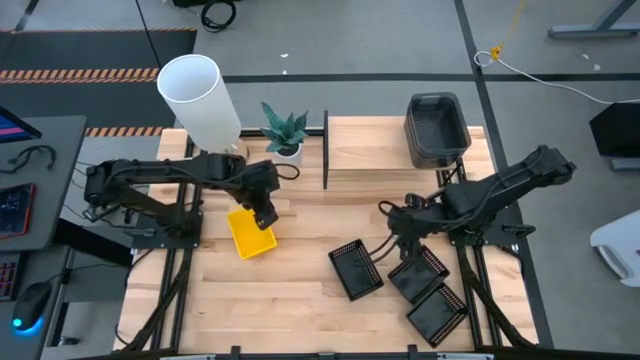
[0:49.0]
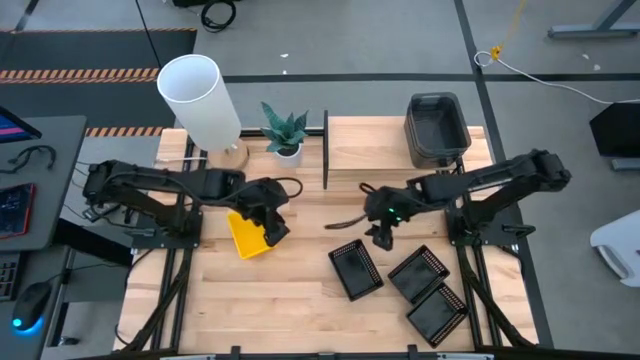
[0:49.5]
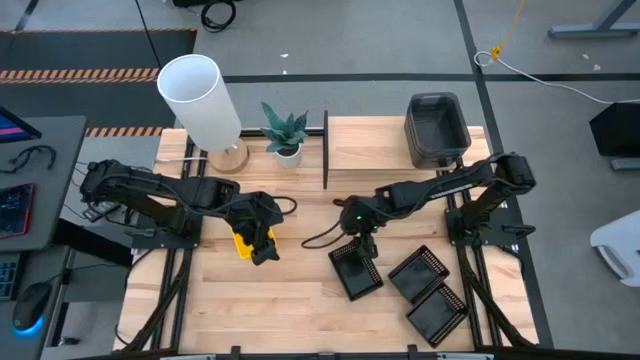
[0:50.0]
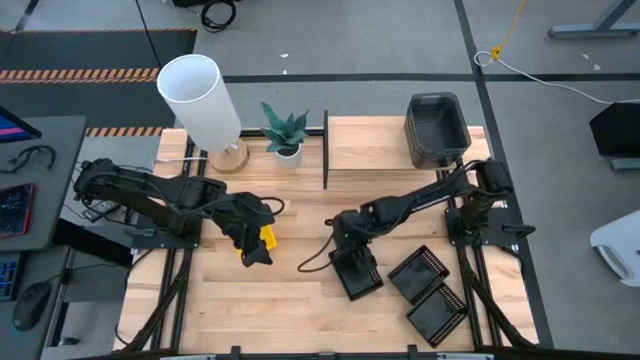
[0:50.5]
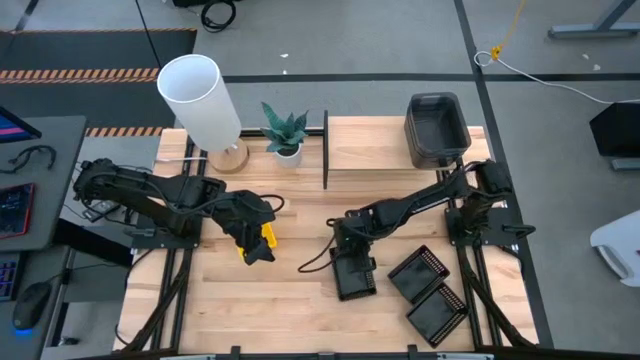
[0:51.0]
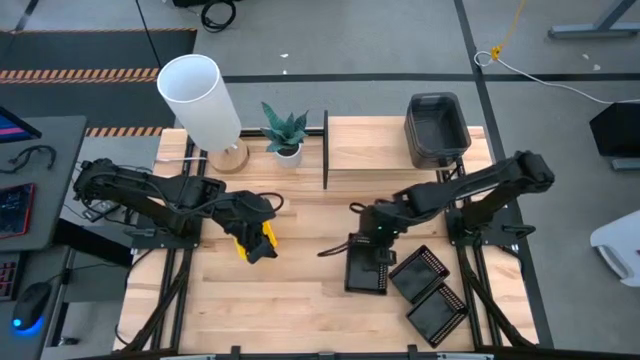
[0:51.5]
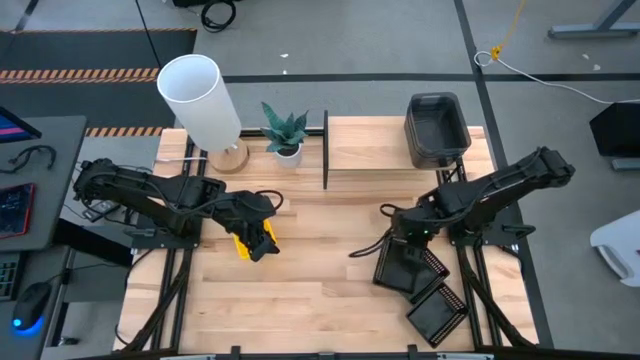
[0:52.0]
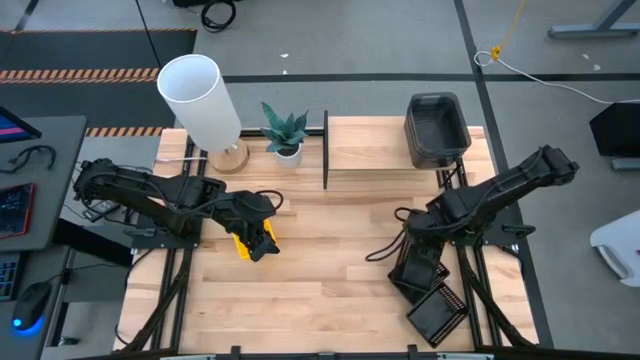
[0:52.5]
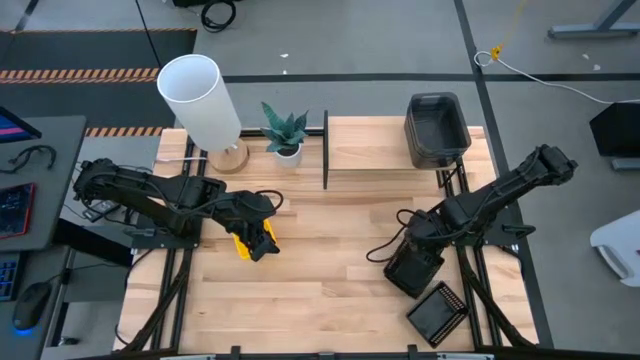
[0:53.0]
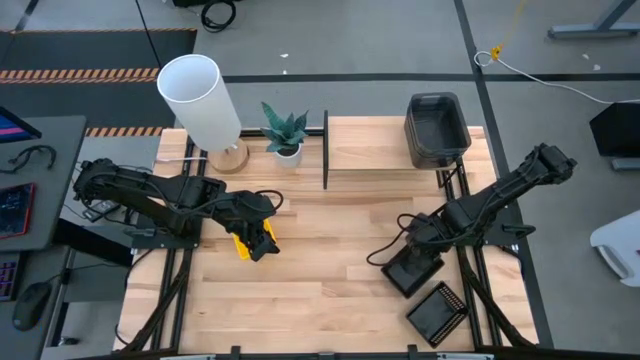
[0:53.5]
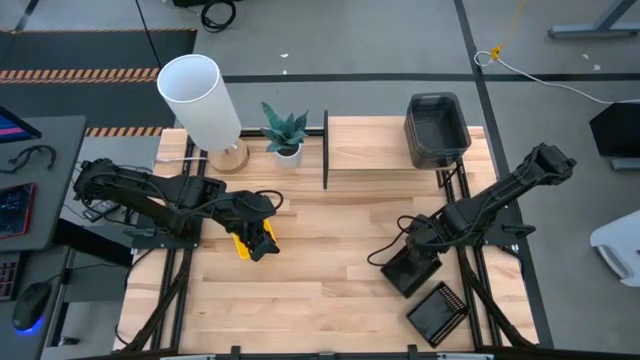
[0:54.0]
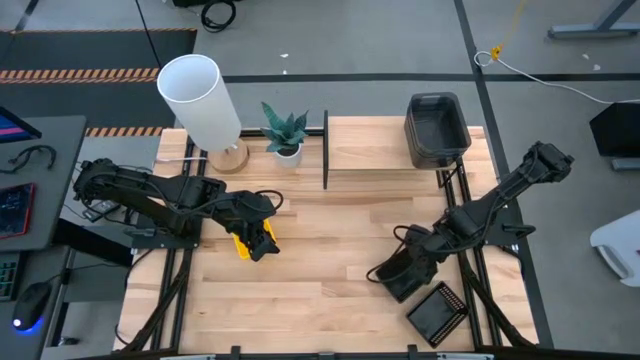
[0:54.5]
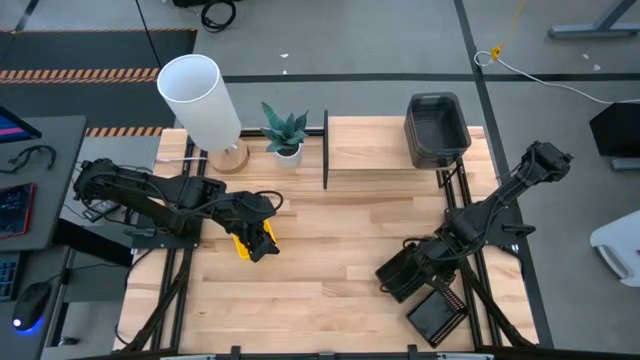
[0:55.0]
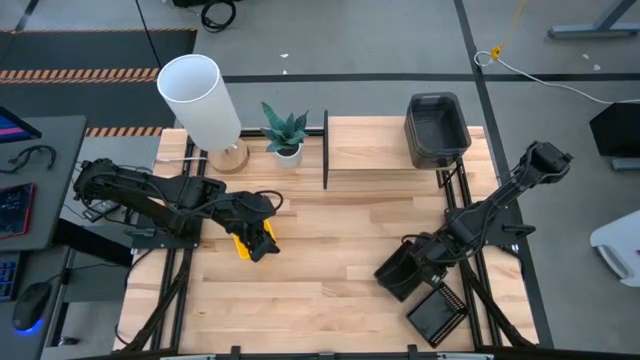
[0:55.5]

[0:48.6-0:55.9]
Task: Stack baskets on shelf by color
Stack the top left black bin on top of the top black bin

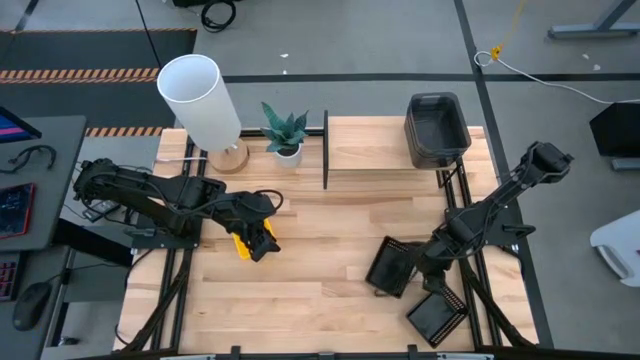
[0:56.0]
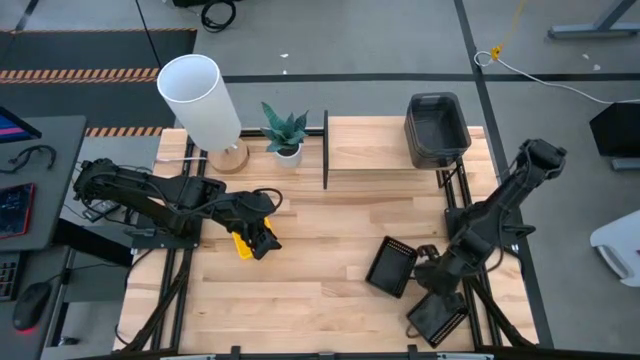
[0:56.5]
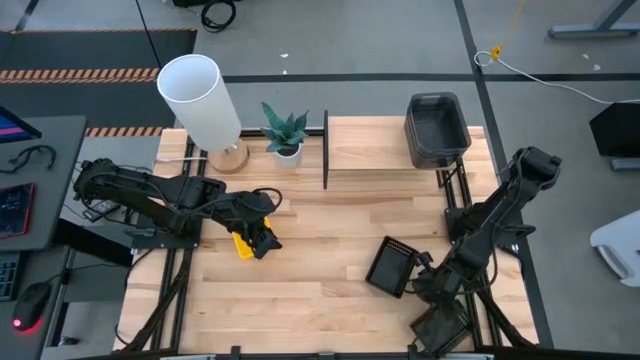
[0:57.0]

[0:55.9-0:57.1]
Stack the bottom black bin on top of the black bin

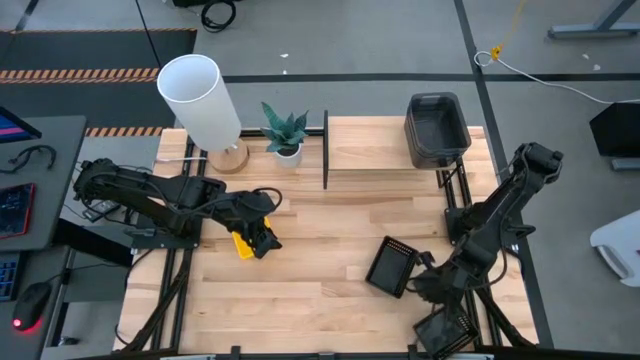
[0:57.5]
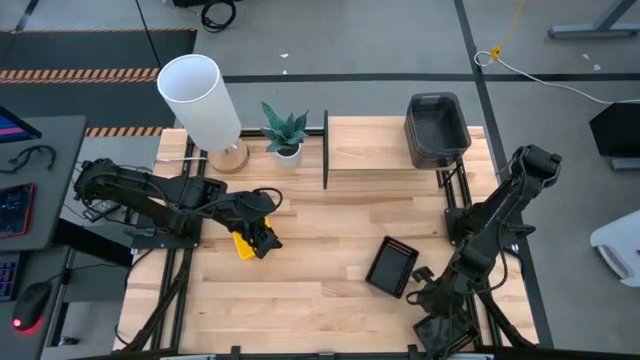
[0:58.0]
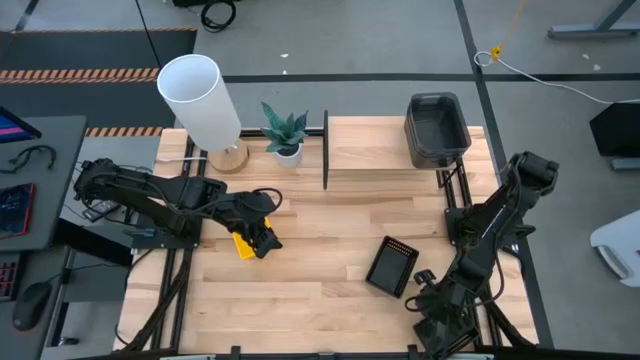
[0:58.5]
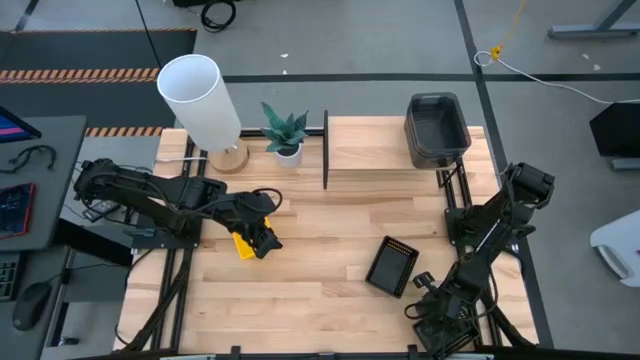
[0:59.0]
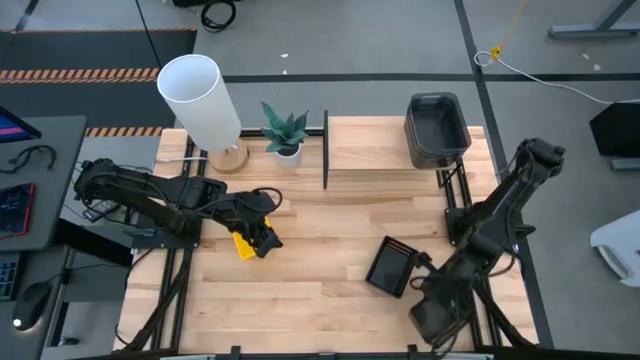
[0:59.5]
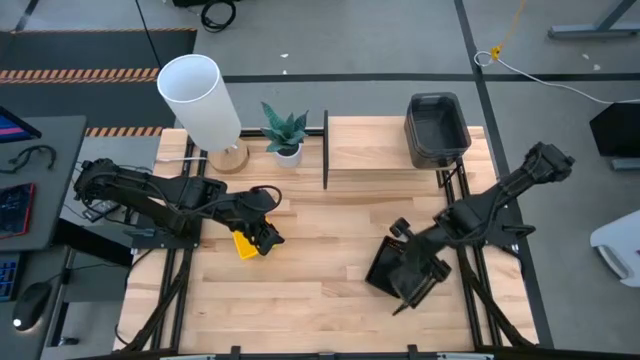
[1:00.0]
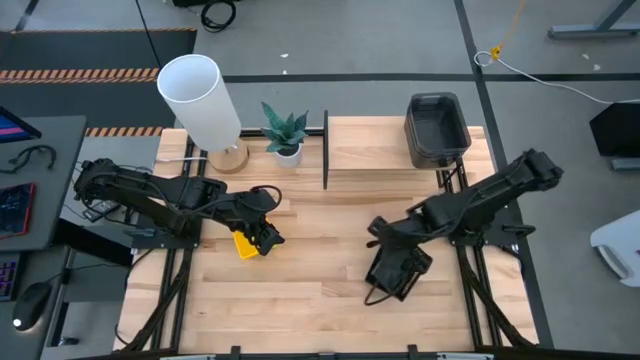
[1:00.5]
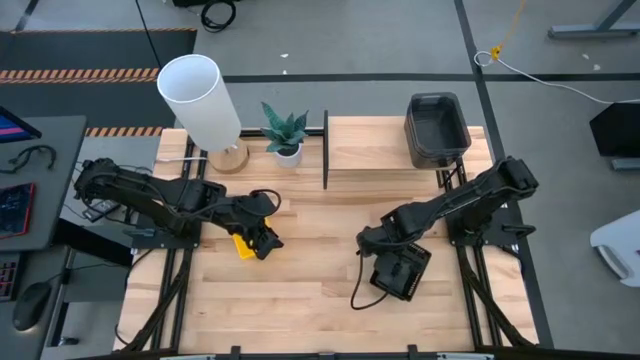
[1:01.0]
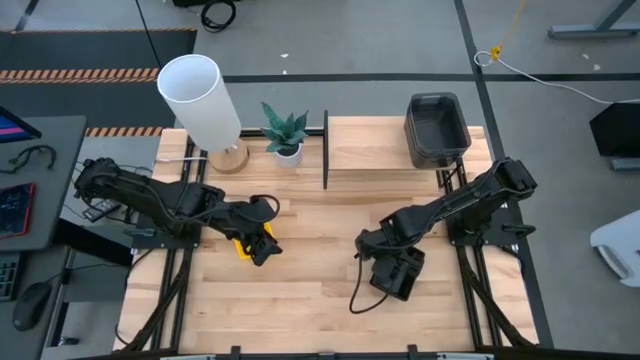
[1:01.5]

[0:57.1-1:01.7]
Stack the bottom black bin on top of the black bin

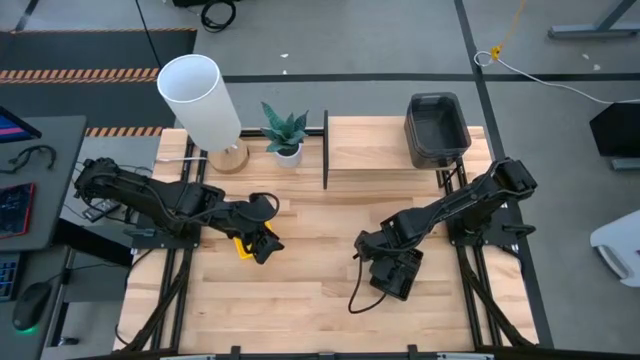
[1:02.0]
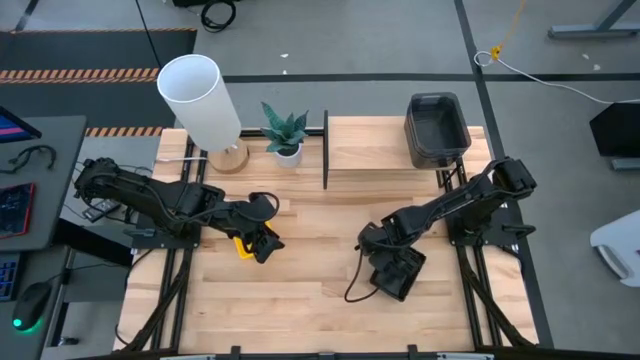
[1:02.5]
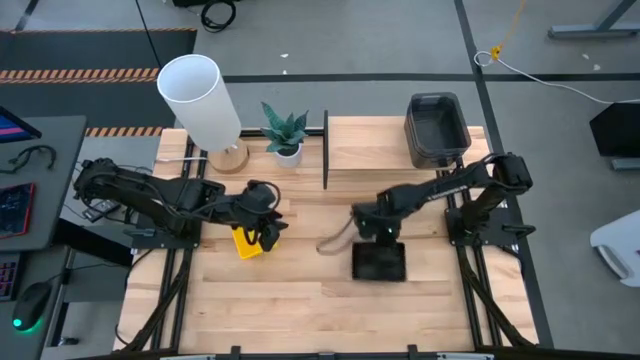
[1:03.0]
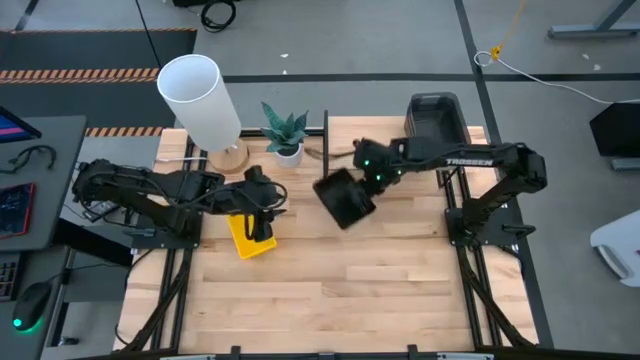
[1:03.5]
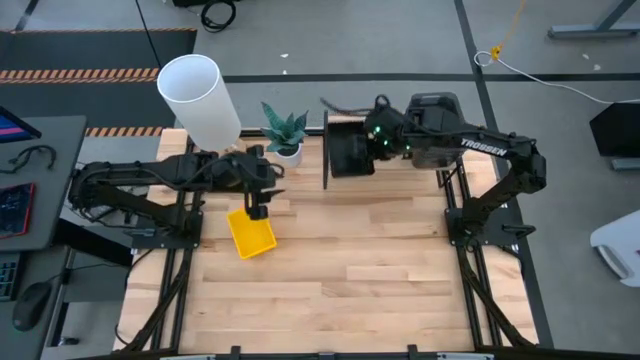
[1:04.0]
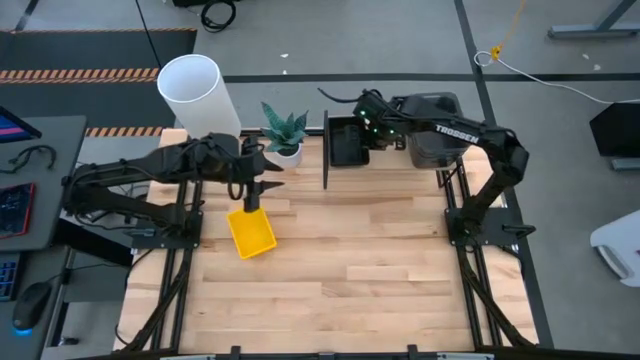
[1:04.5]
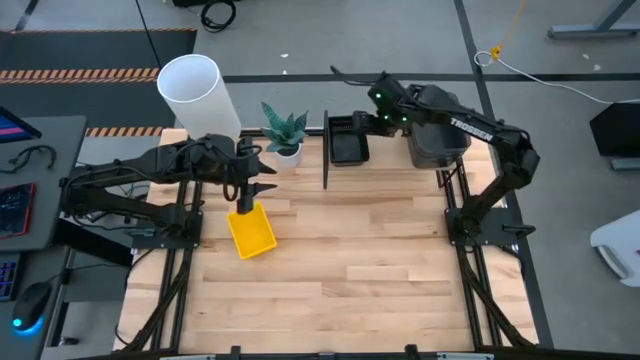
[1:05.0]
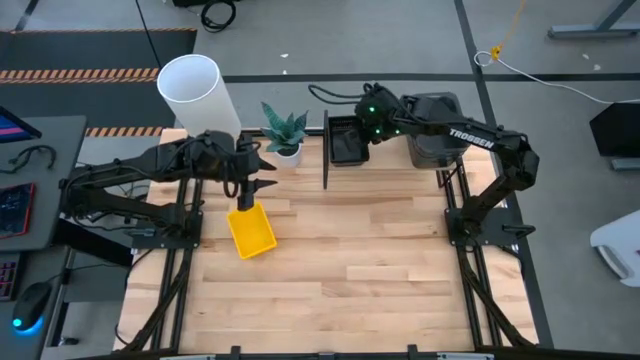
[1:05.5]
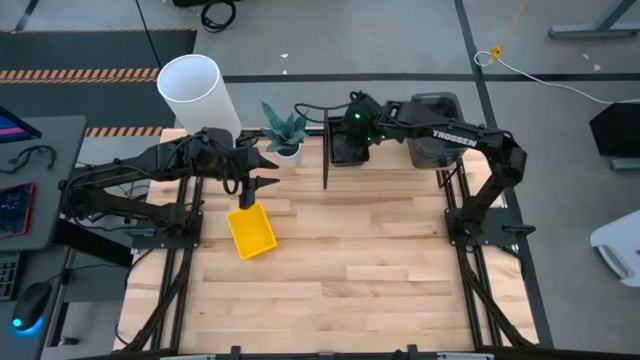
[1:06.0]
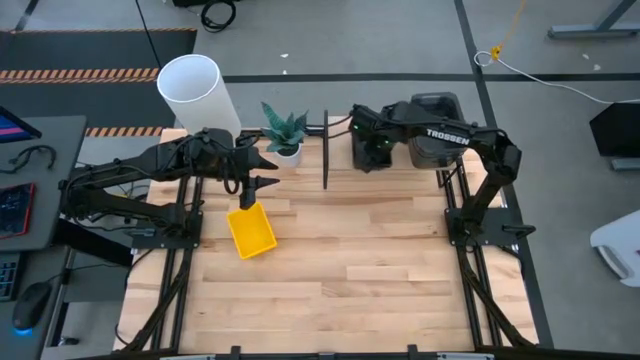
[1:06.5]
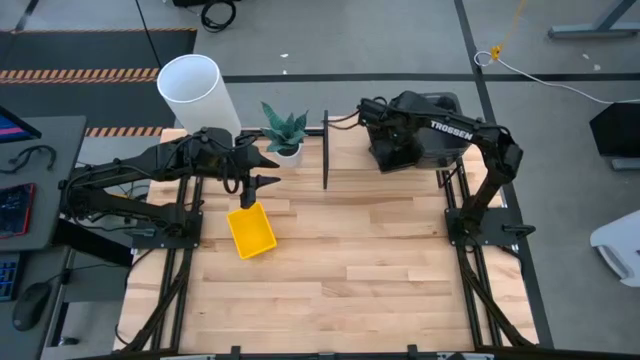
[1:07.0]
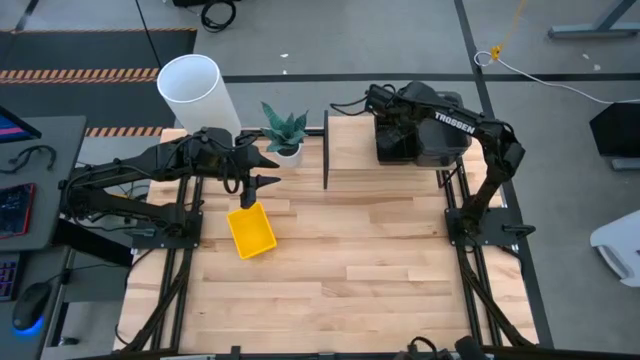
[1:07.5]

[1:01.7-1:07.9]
Put the stacked black bins on the shelf

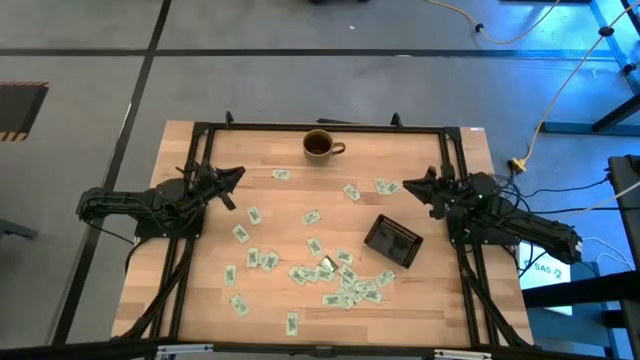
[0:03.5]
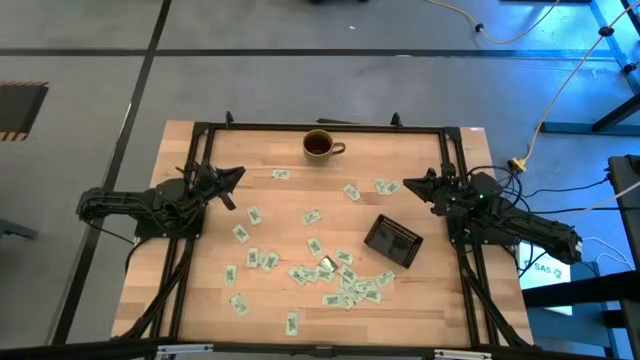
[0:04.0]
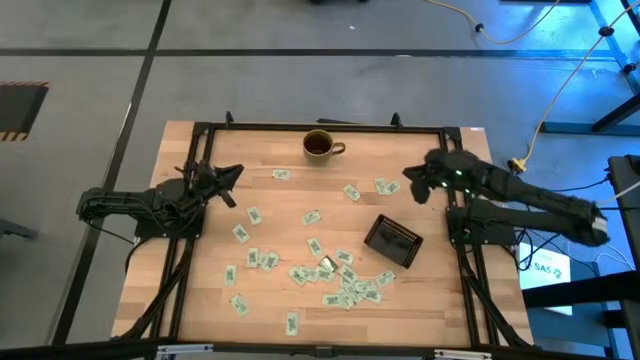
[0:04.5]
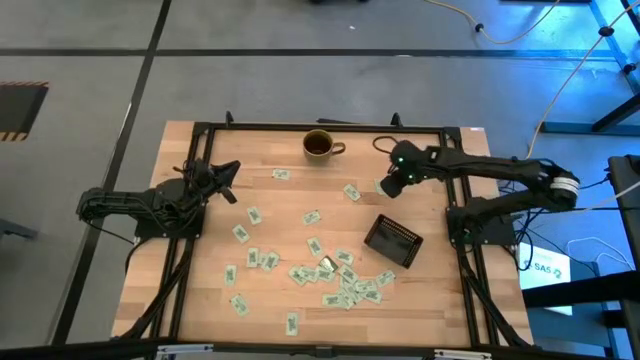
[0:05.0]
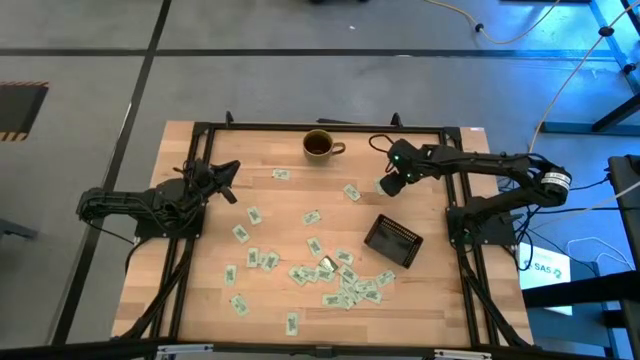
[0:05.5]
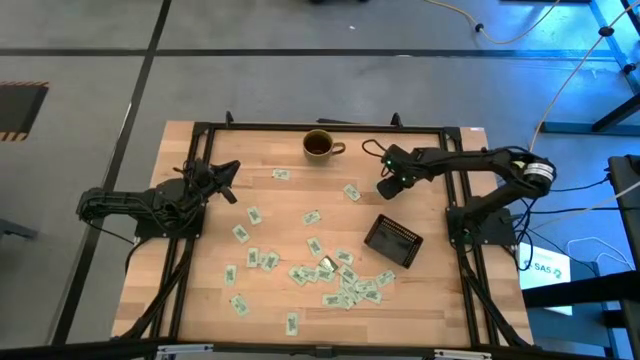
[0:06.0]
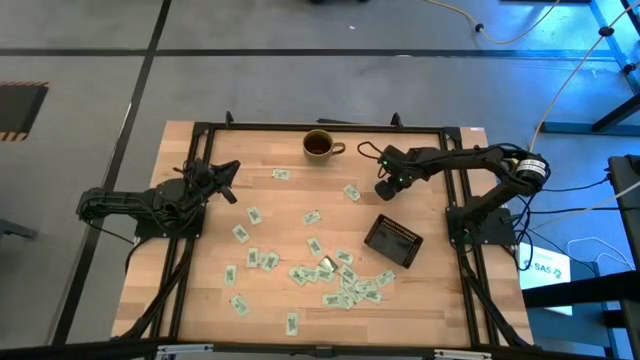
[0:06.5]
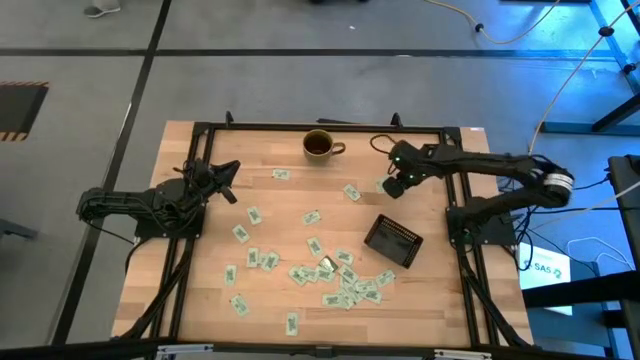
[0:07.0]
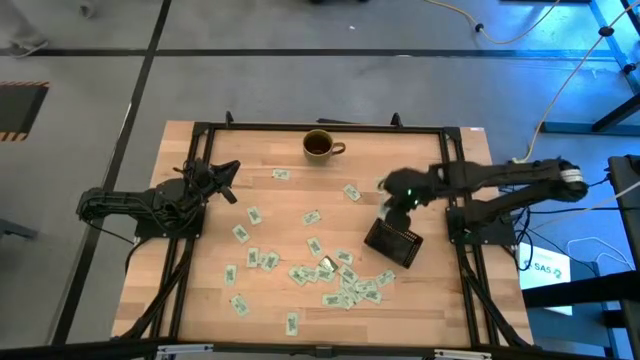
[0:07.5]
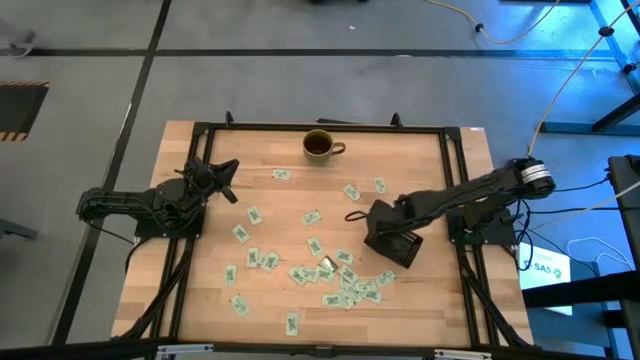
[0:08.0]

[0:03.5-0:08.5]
Task: Pick and place Stevia / Truvia into bins
Put the stevia packet into the black bin
